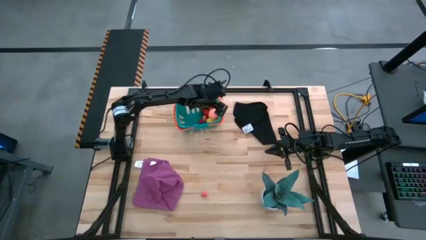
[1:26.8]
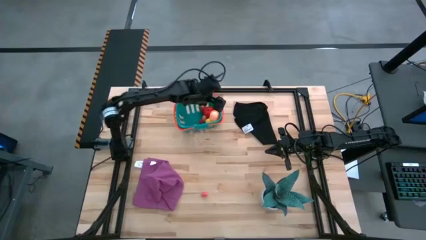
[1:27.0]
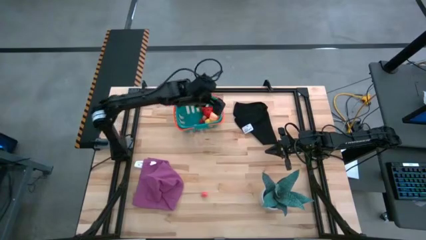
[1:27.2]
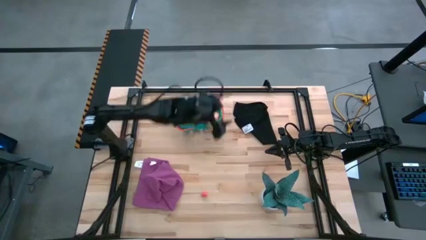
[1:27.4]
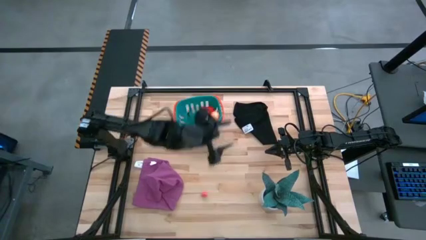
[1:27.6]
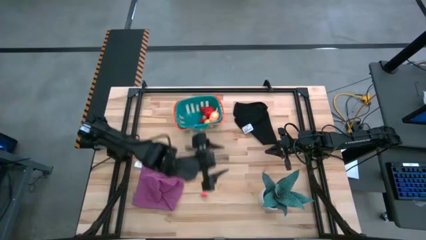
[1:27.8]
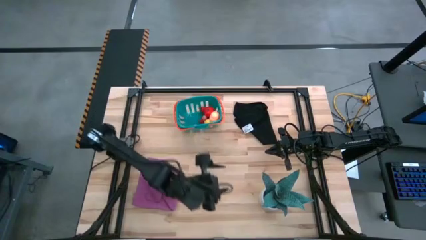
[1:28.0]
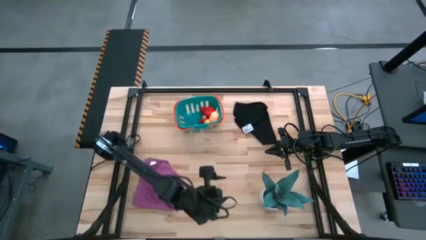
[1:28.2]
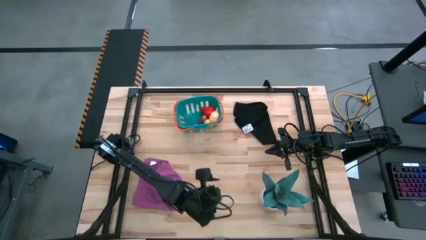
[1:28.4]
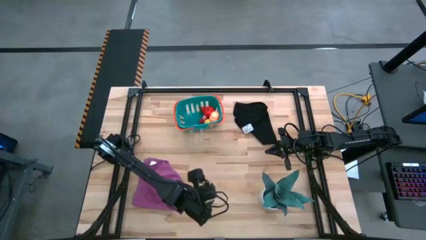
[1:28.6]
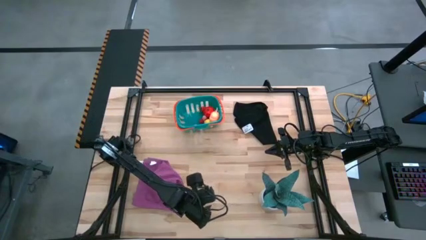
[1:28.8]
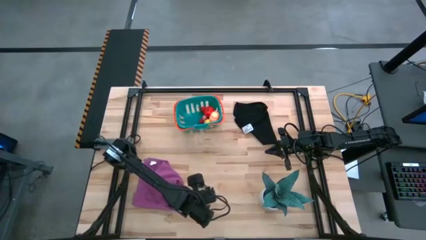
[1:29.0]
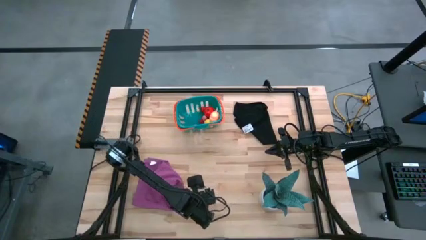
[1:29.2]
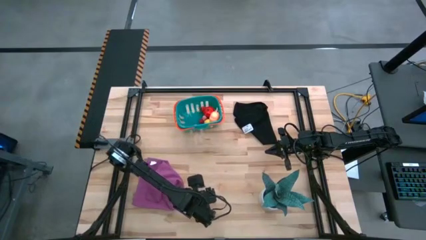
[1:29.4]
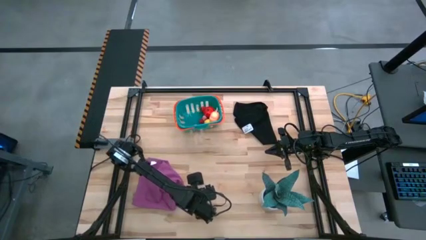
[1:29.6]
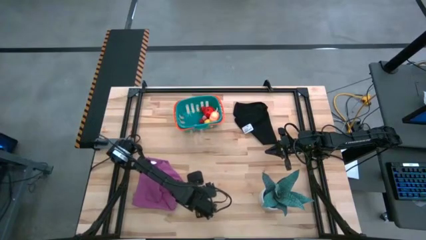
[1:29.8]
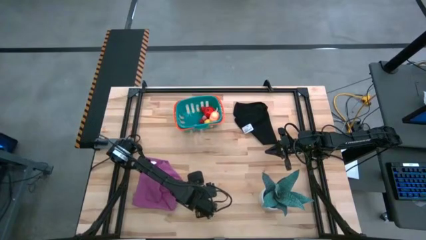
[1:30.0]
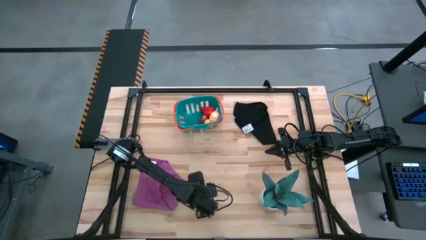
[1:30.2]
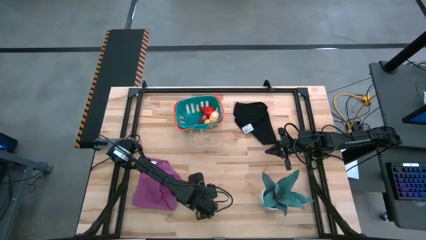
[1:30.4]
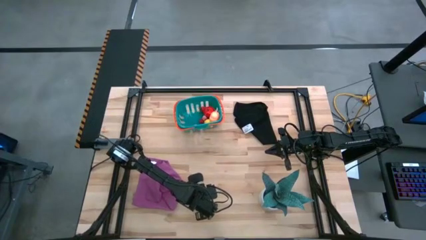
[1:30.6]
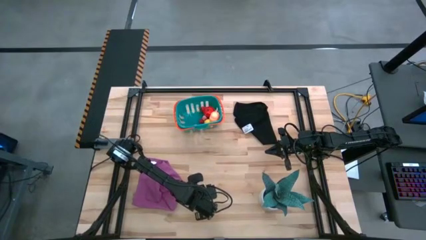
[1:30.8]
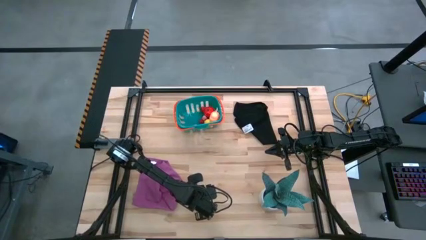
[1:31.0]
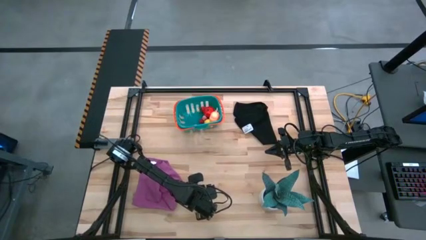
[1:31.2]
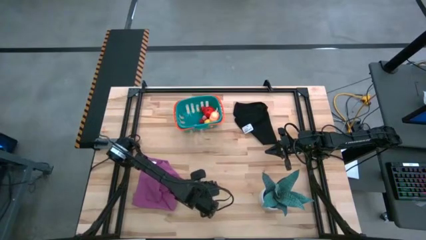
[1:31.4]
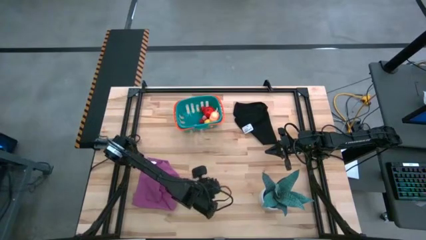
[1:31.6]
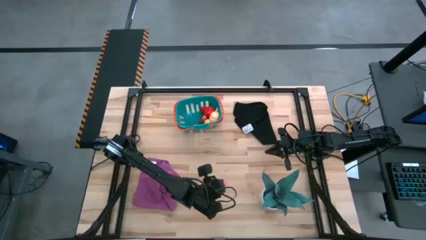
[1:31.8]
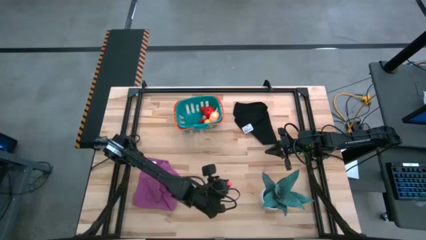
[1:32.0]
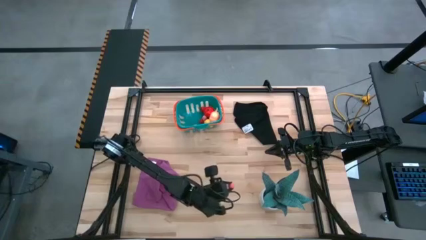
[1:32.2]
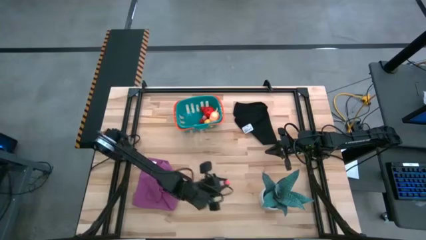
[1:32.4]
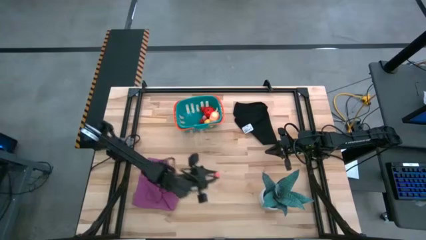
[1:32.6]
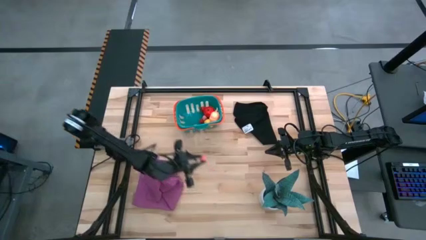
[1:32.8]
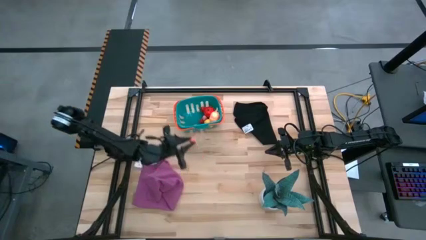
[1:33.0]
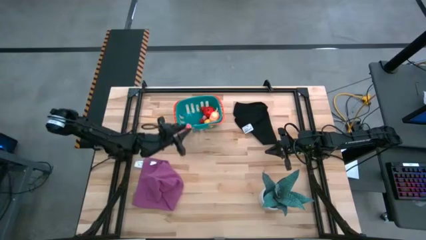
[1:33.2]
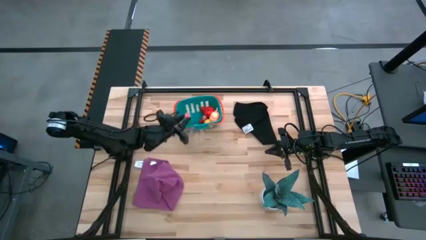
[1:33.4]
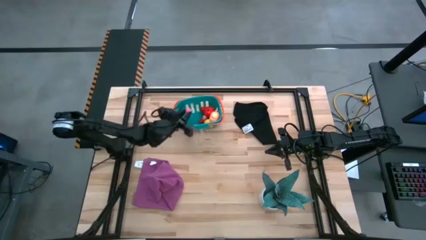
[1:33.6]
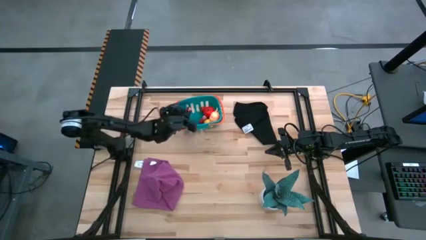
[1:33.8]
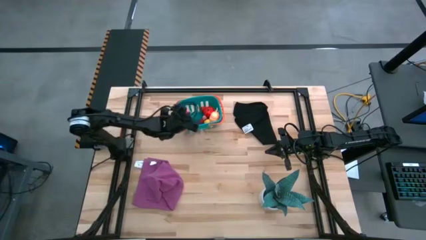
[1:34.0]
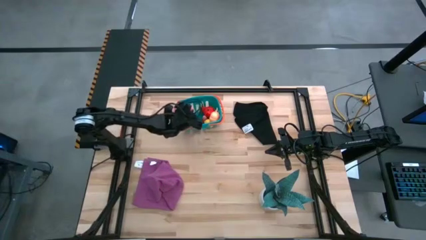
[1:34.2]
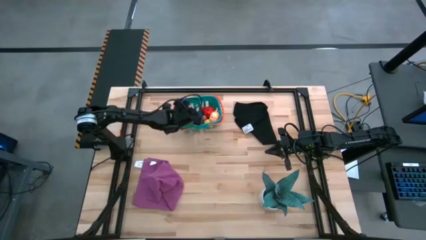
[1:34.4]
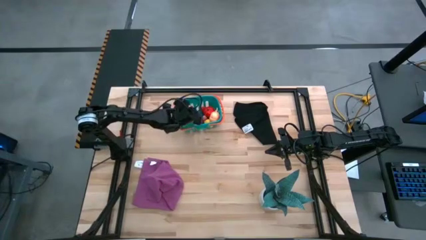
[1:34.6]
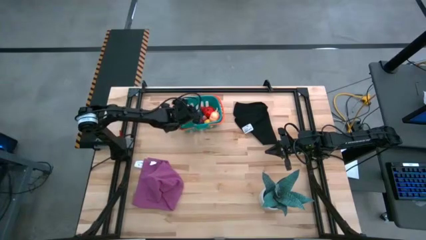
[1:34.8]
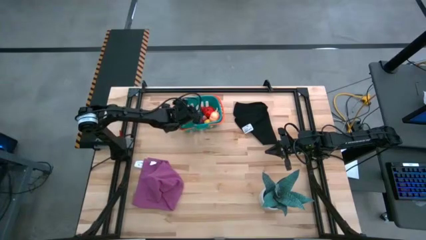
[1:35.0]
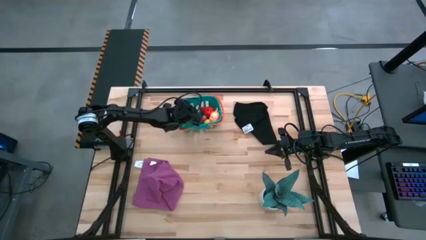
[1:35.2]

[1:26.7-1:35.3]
Task: Pick and placing Produce into tupperware
Put the small pink peach into the basket

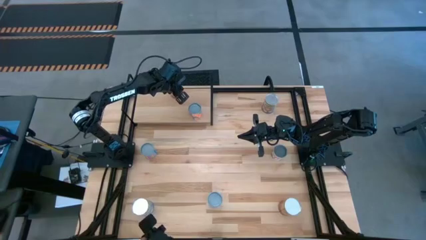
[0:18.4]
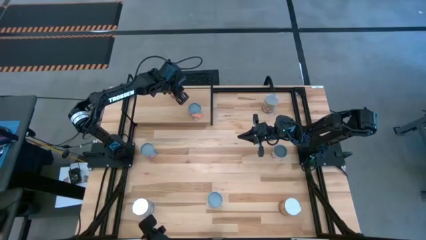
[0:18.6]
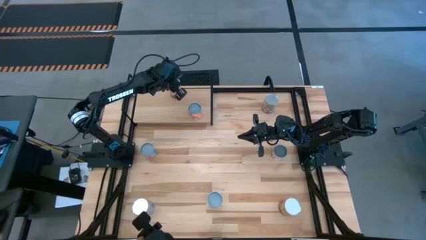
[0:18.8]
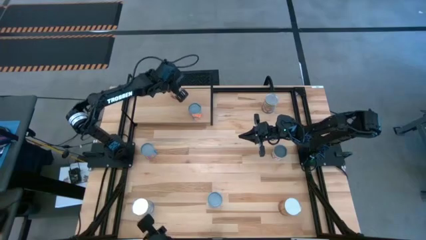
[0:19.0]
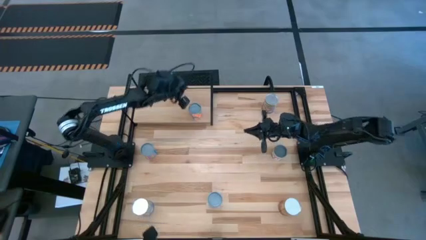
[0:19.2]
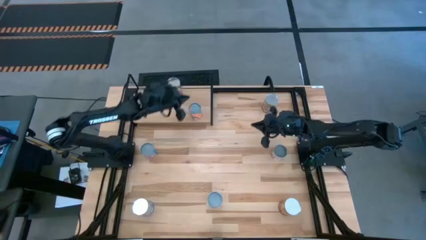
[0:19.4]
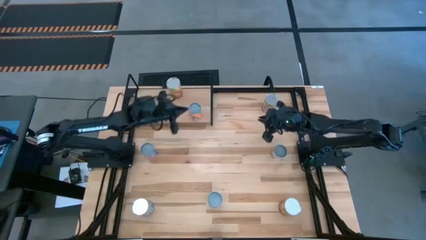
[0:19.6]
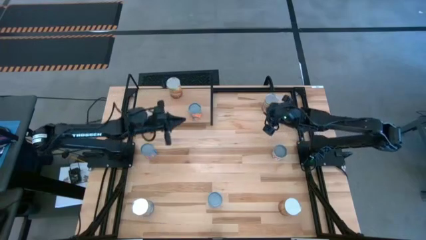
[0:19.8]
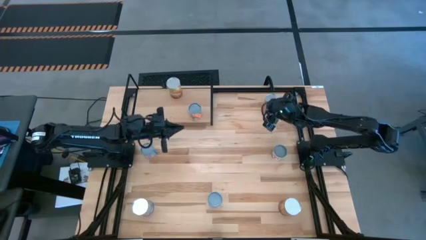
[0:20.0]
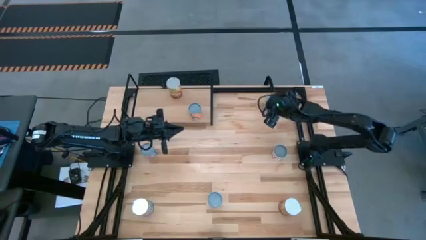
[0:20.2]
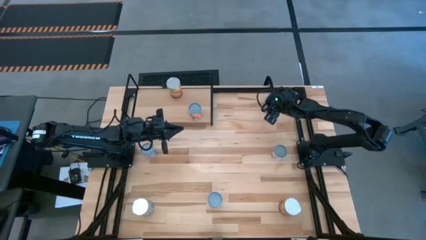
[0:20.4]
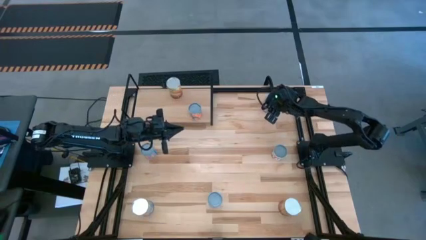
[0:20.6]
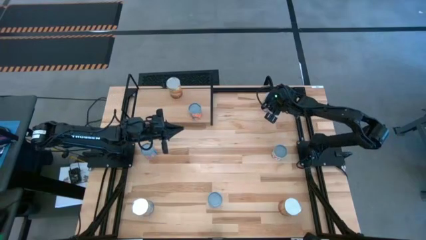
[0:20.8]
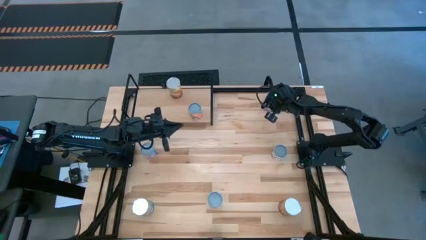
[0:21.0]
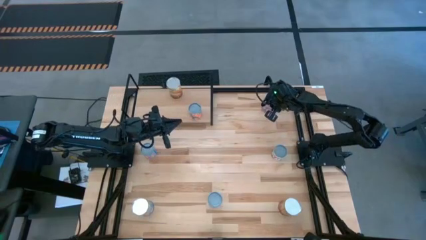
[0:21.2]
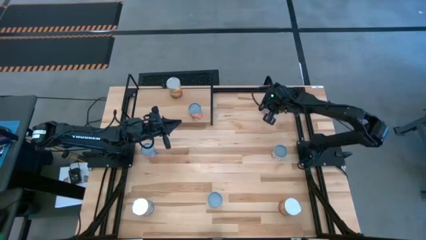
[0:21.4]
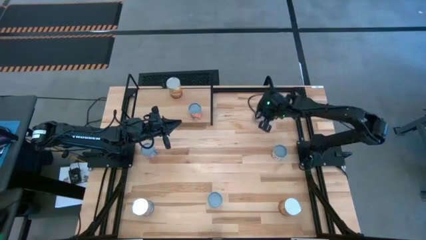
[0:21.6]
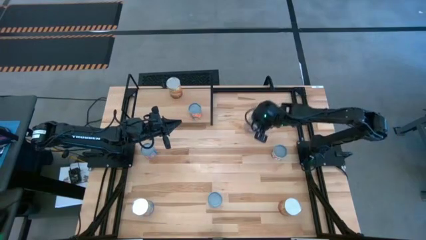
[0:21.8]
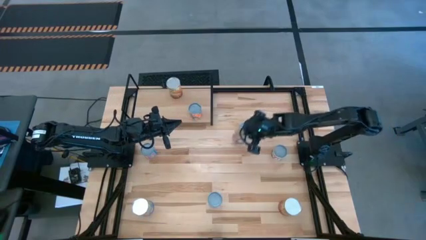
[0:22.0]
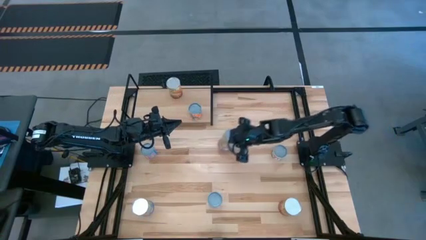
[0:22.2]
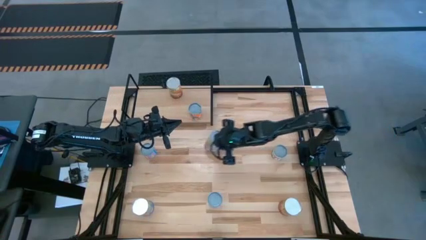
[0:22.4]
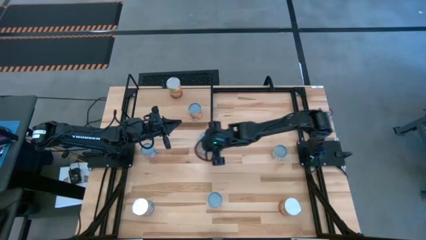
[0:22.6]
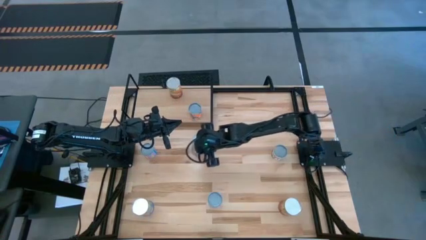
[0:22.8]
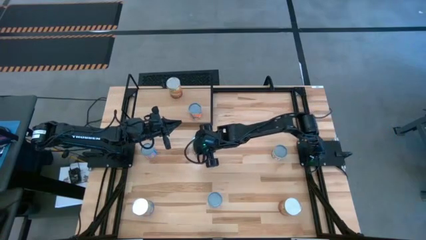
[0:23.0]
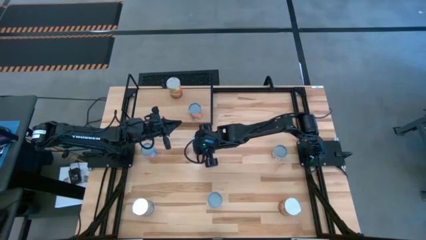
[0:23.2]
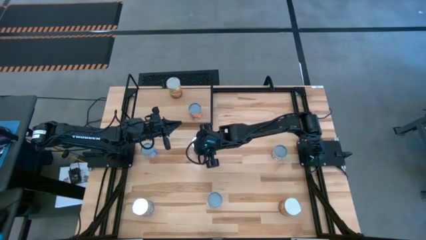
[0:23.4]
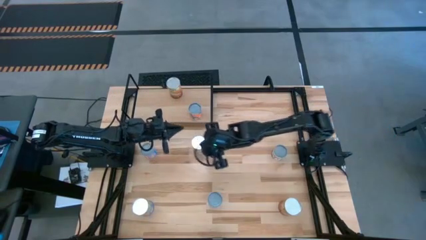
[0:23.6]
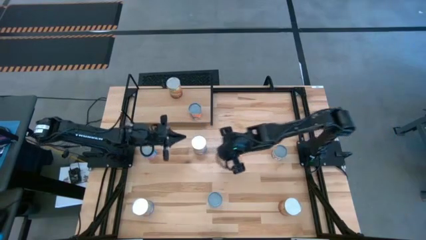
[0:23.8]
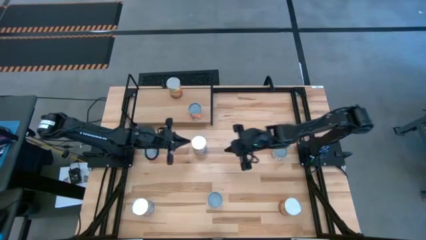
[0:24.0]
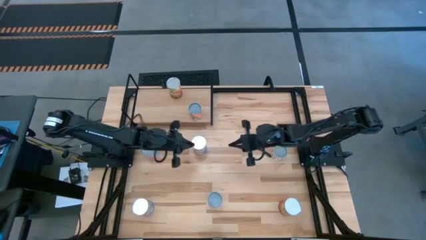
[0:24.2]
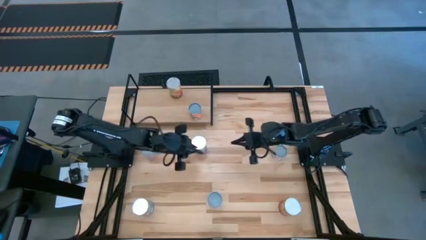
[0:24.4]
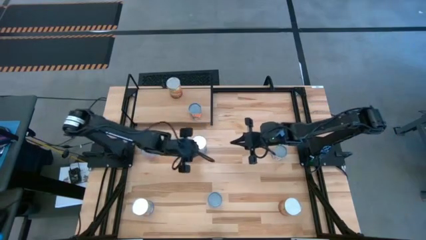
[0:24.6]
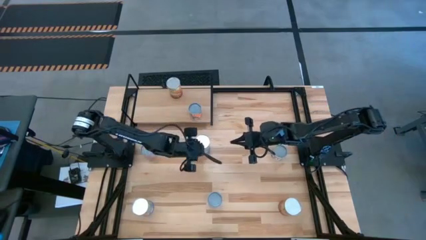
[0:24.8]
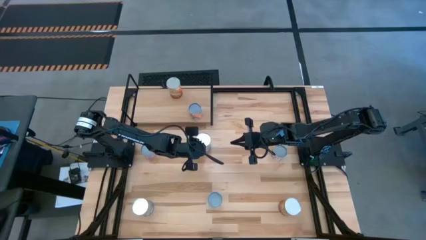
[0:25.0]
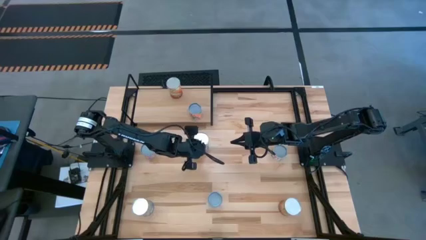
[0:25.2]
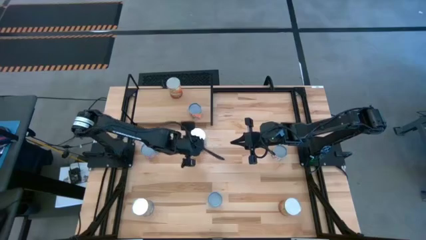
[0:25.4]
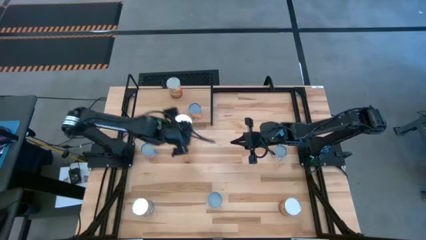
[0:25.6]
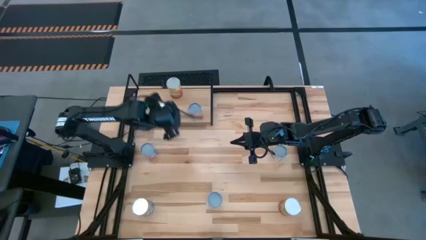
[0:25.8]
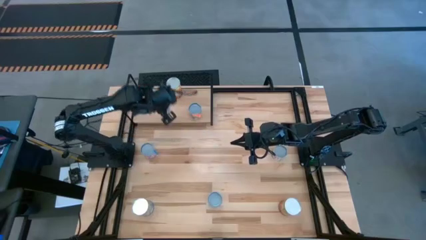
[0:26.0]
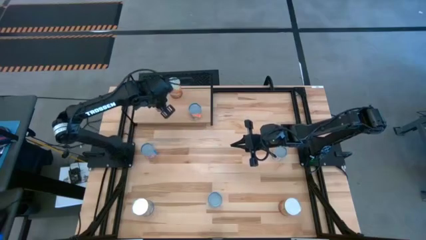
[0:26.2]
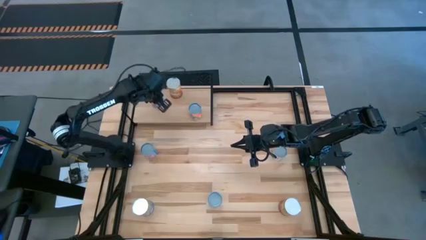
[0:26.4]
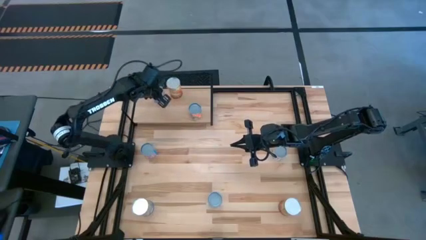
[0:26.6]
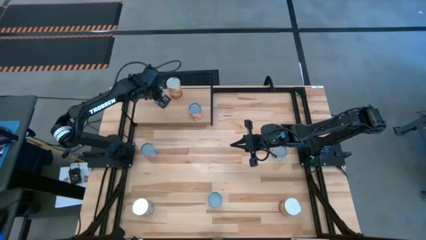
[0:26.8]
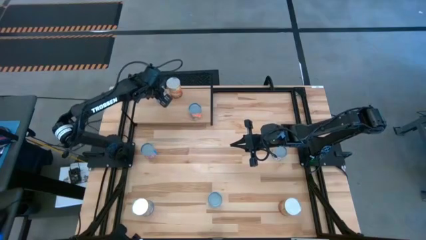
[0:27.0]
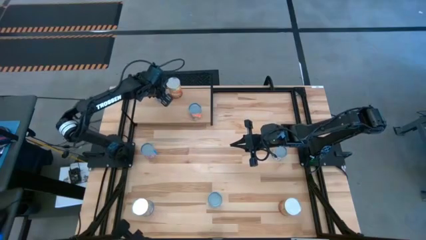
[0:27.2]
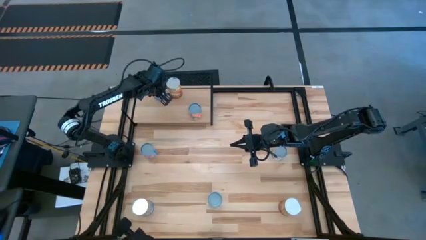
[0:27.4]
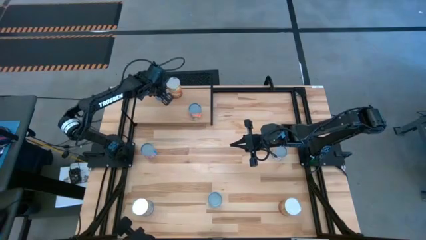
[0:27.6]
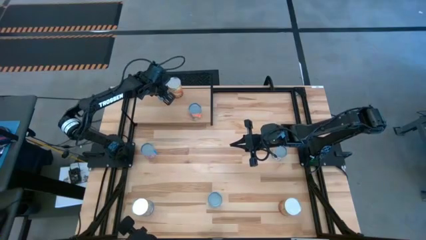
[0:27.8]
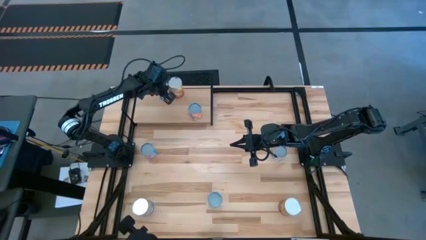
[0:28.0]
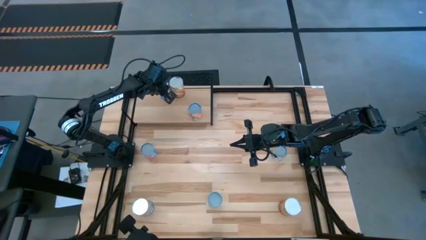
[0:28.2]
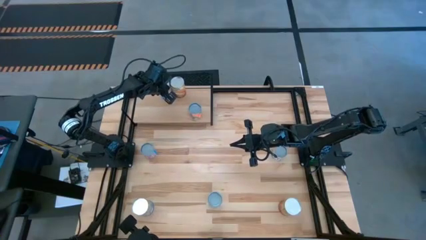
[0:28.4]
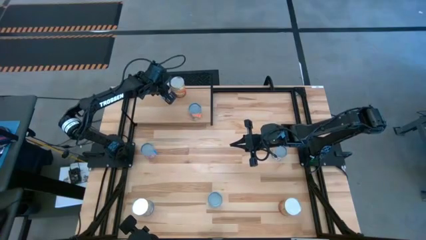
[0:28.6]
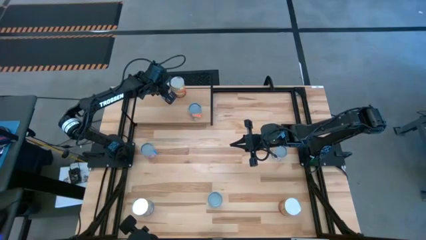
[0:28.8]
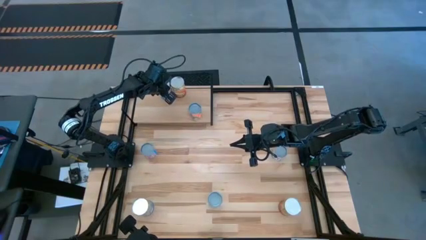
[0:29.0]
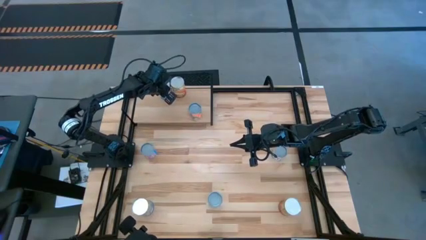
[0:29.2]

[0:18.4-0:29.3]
Task: Pick and place cans onto a shelf
Put the top canned peaches on the shelf
